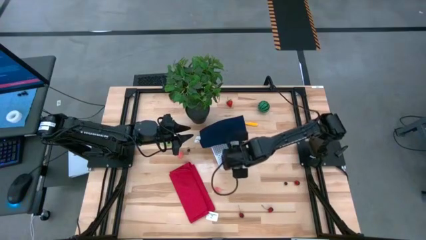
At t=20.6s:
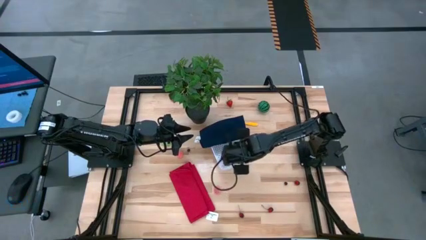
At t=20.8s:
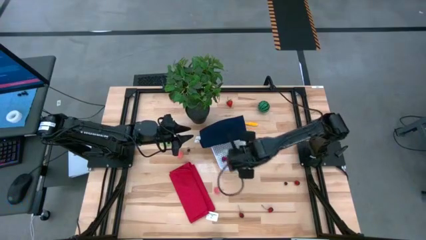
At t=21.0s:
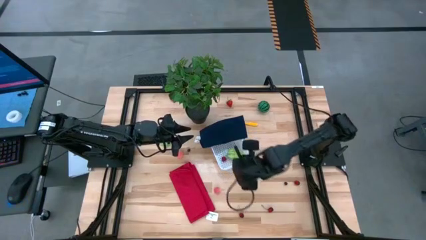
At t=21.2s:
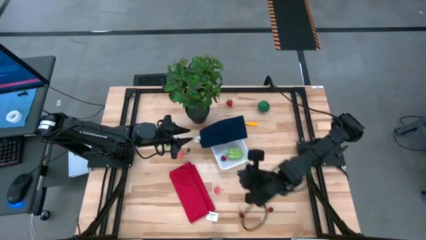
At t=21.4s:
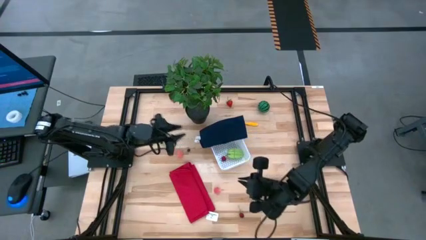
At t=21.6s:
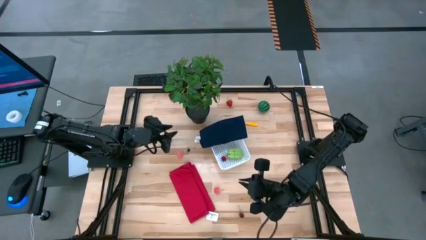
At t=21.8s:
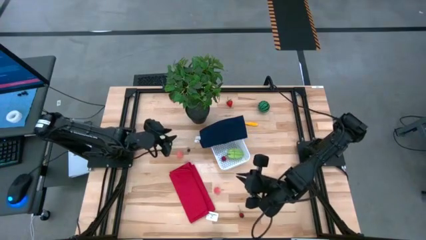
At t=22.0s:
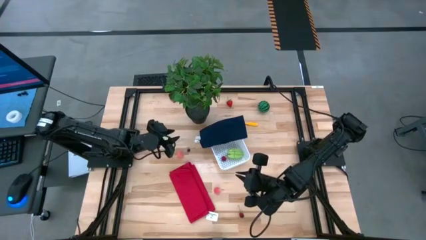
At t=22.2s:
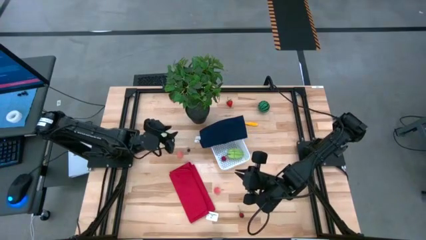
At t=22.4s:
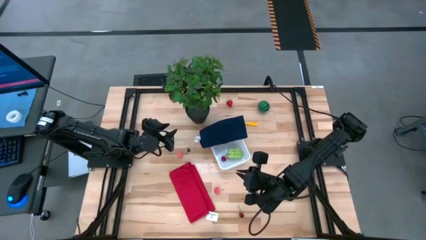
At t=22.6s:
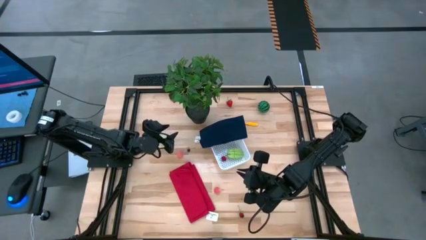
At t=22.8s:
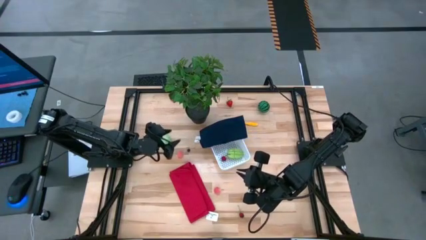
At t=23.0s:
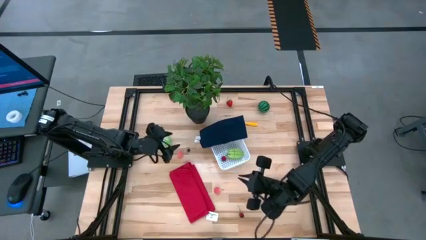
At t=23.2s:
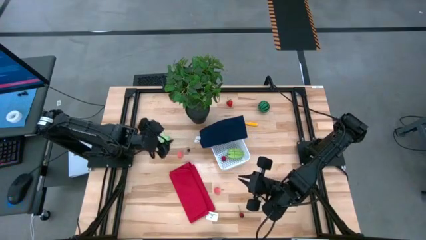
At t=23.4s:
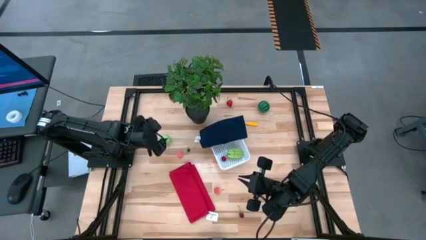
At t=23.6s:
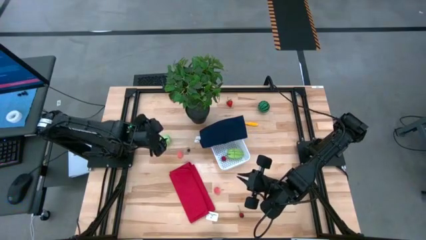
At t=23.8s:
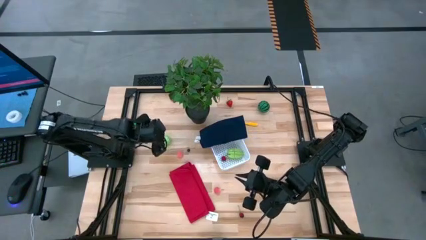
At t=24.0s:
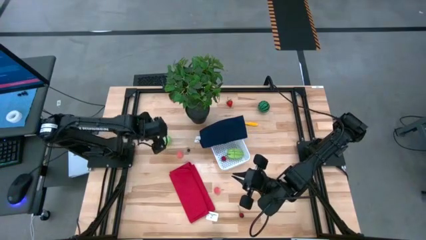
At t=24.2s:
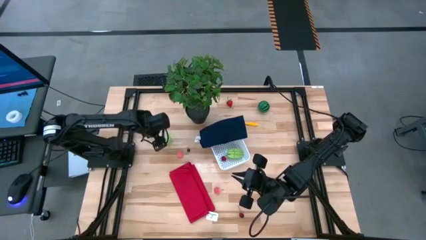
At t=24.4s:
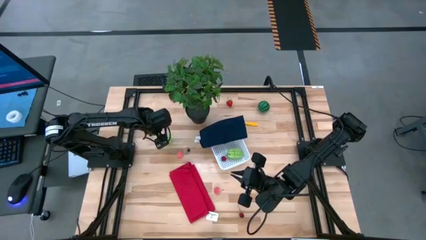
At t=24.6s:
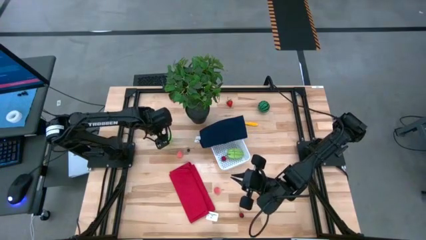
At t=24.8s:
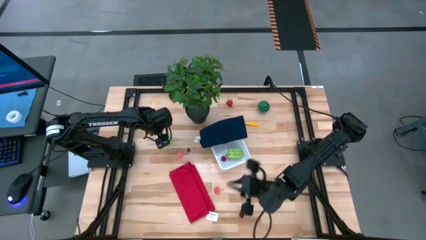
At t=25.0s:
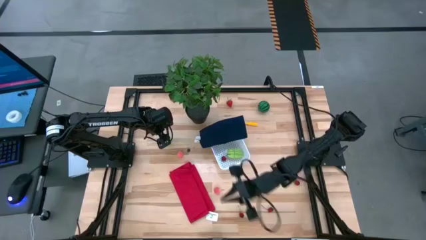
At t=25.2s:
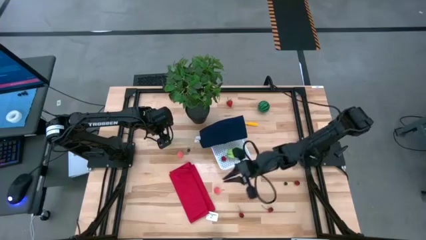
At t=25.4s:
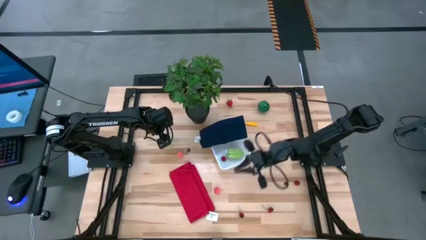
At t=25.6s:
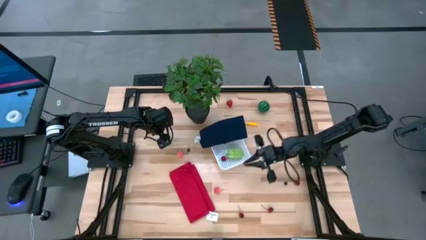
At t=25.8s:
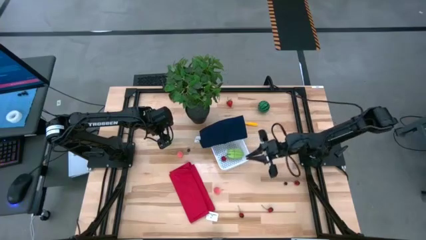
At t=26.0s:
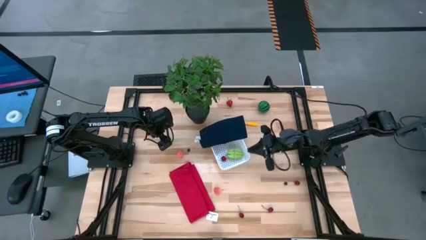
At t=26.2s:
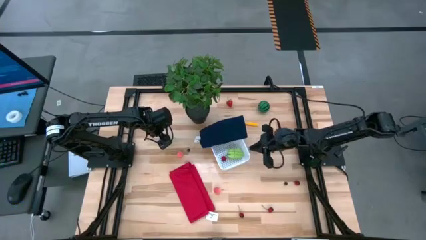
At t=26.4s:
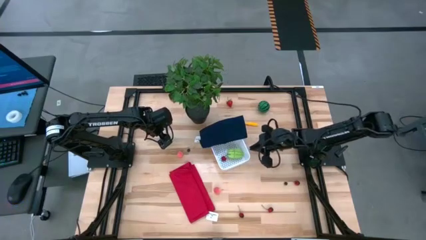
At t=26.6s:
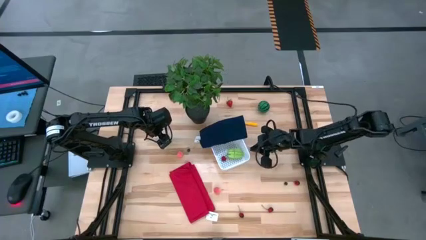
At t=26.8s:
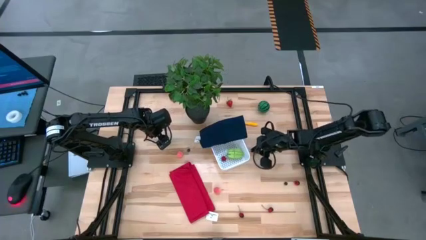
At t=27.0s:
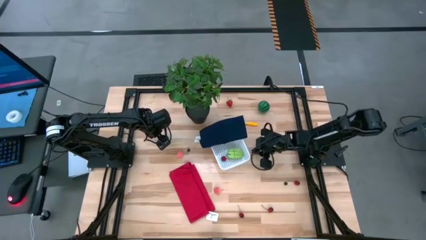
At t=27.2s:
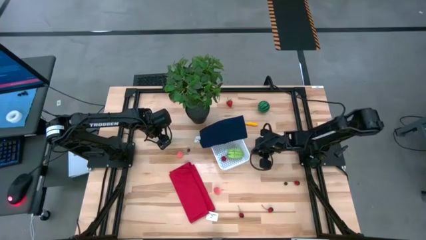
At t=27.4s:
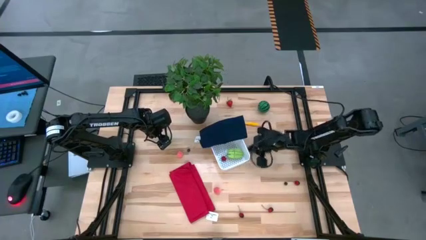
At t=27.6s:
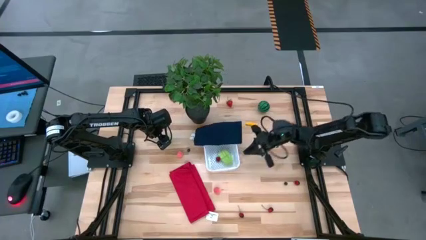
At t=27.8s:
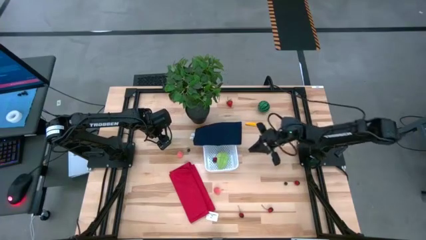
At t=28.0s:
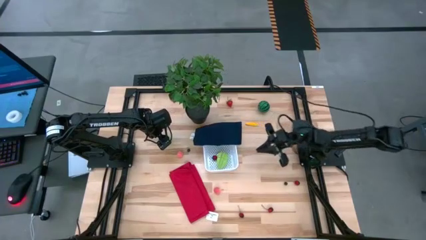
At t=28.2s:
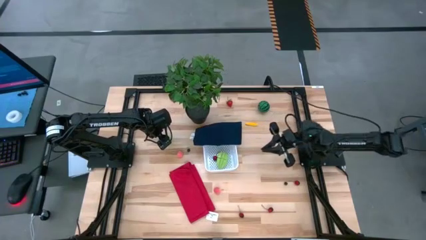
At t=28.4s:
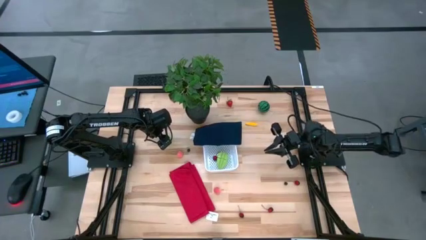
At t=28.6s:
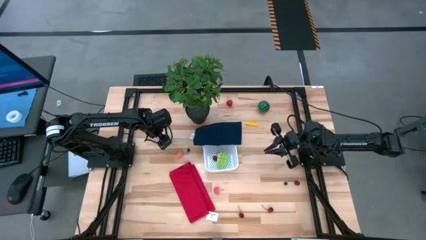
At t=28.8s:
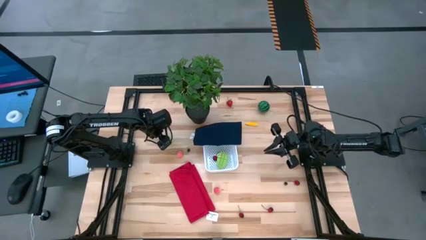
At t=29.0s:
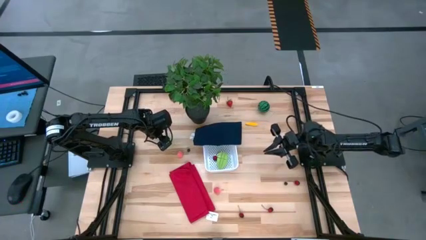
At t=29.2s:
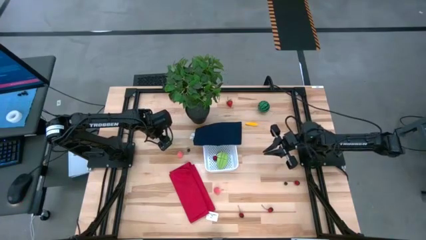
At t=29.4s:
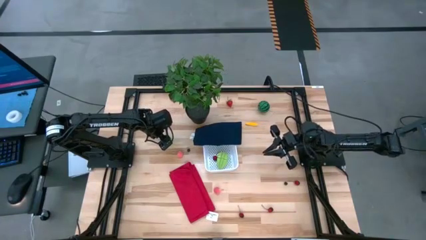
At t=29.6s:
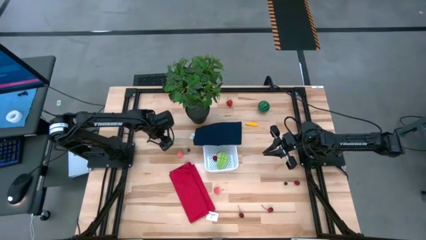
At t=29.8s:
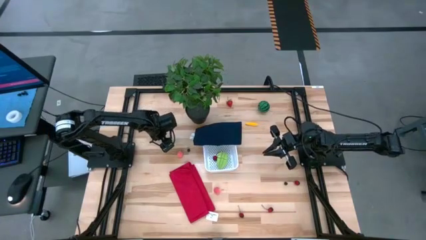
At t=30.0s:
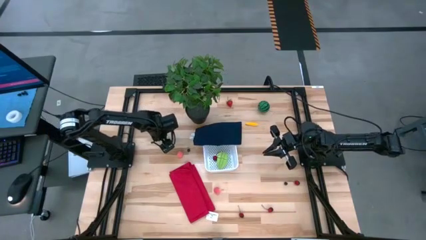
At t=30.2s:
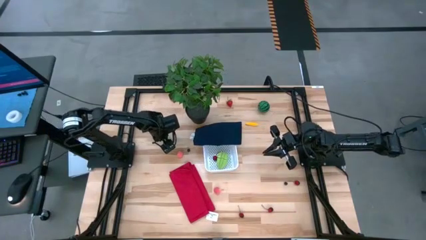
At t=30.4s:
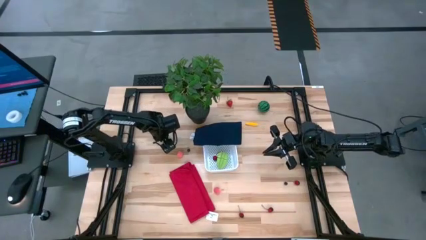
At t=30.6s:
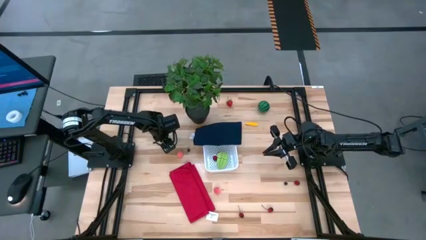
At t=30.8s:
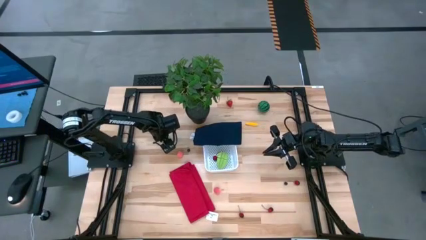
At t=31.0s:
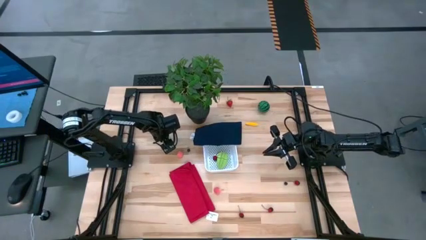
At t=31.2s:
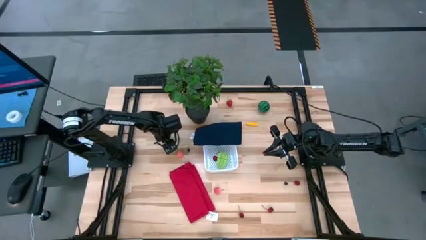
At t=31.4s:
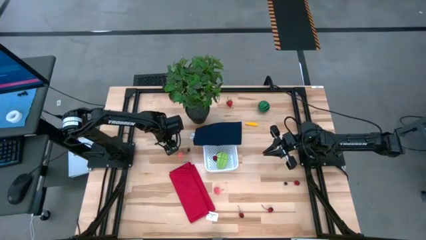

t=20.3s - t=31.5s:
Task: Pick and placing Produce into tupperware
Put the cabbage into the bin

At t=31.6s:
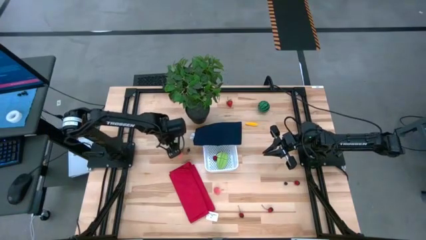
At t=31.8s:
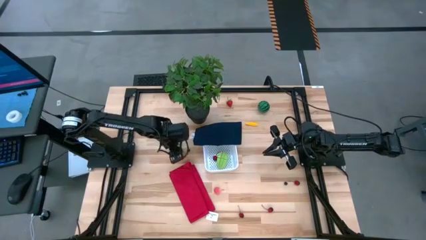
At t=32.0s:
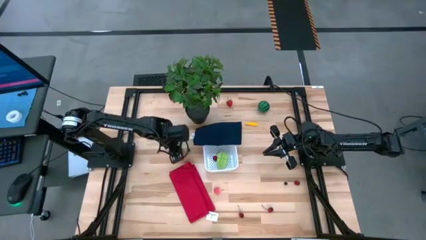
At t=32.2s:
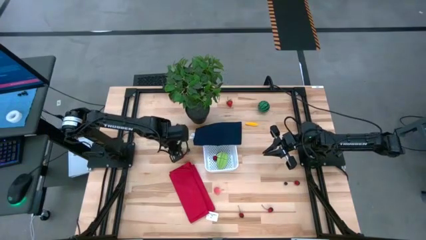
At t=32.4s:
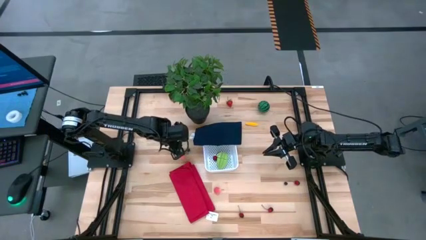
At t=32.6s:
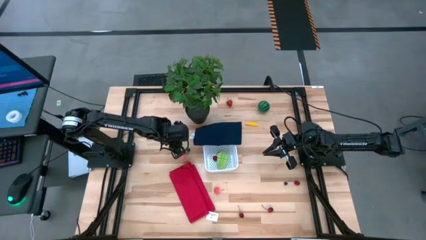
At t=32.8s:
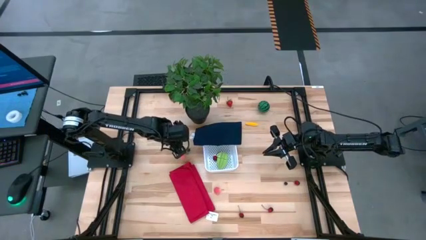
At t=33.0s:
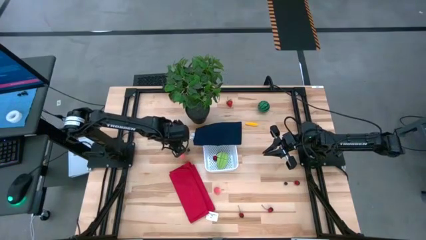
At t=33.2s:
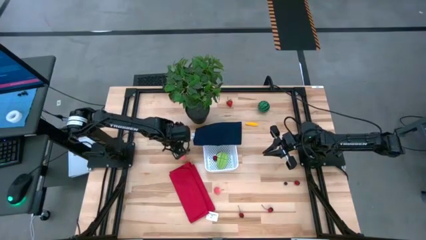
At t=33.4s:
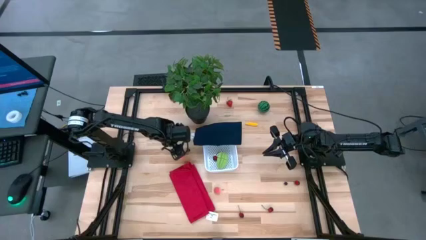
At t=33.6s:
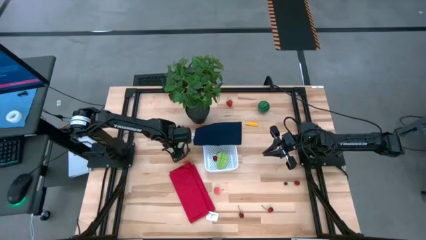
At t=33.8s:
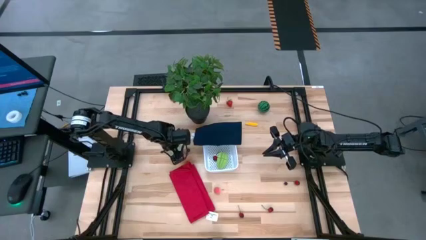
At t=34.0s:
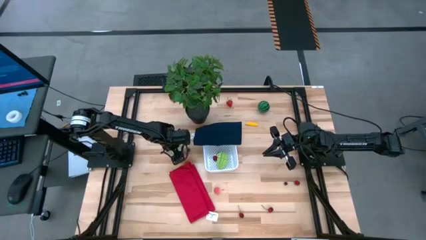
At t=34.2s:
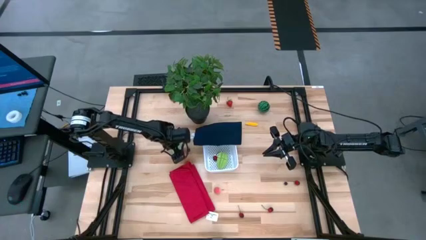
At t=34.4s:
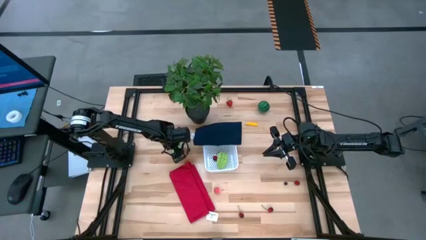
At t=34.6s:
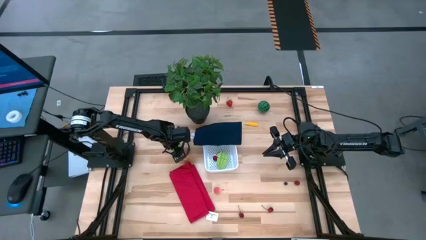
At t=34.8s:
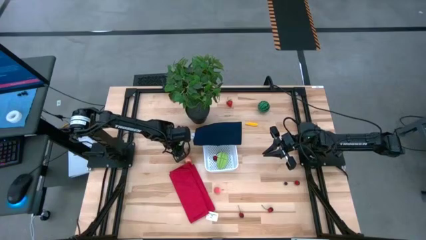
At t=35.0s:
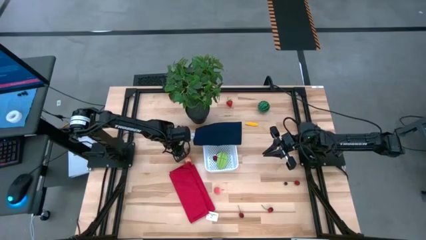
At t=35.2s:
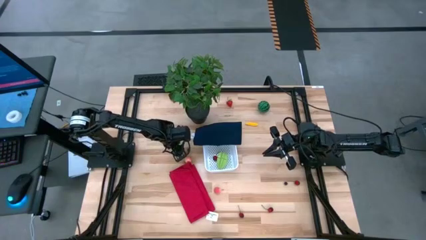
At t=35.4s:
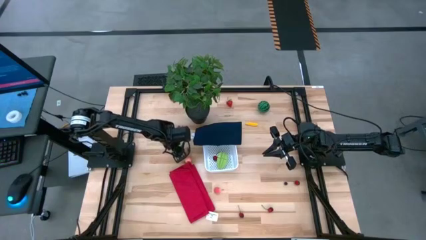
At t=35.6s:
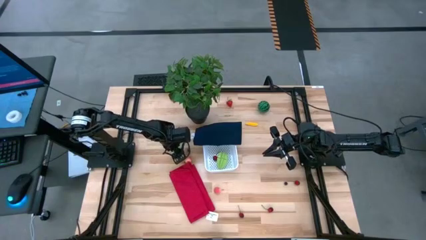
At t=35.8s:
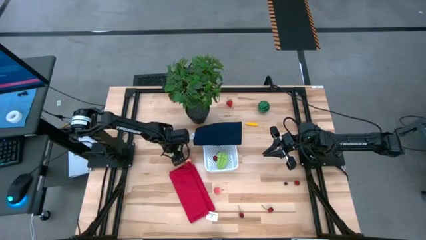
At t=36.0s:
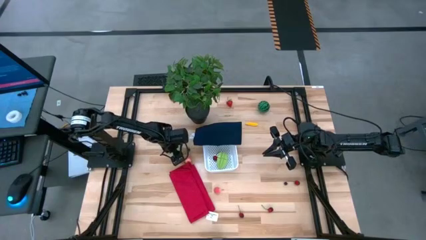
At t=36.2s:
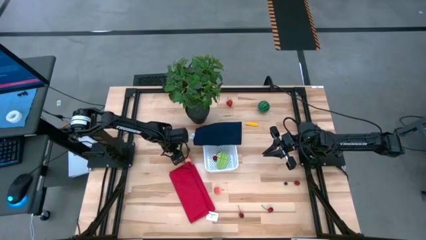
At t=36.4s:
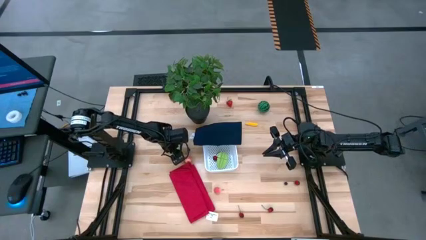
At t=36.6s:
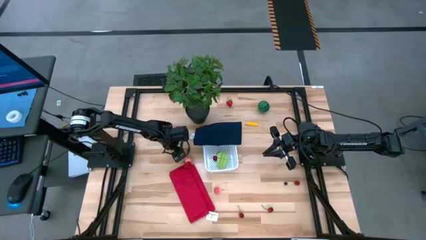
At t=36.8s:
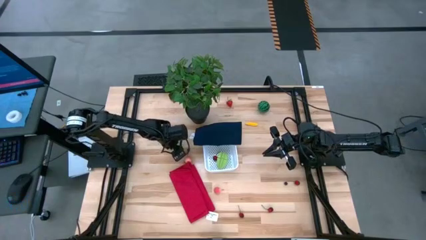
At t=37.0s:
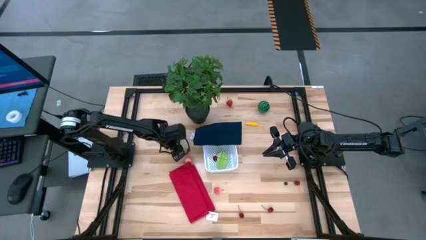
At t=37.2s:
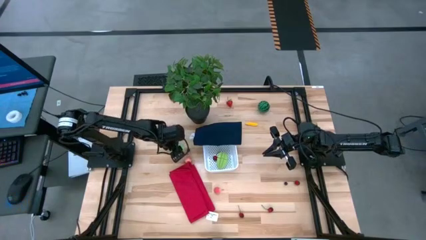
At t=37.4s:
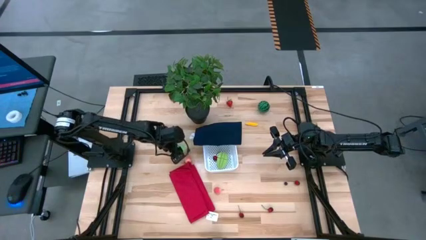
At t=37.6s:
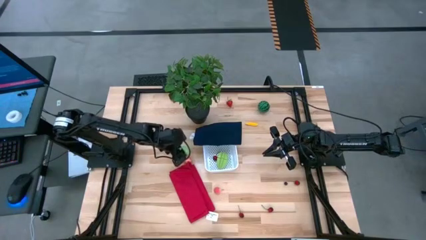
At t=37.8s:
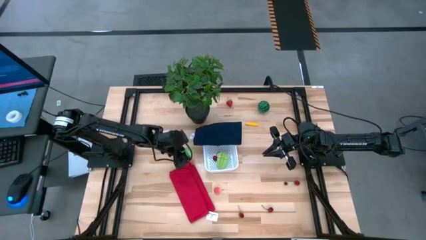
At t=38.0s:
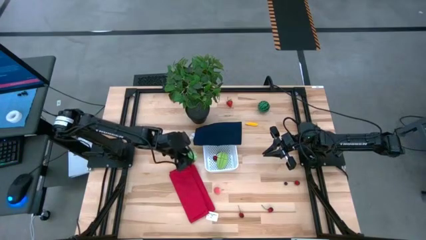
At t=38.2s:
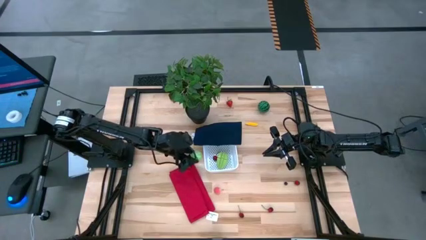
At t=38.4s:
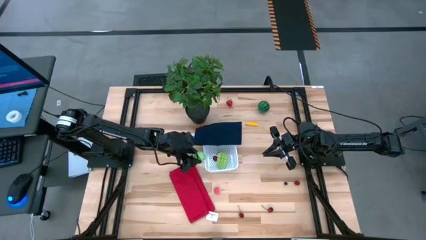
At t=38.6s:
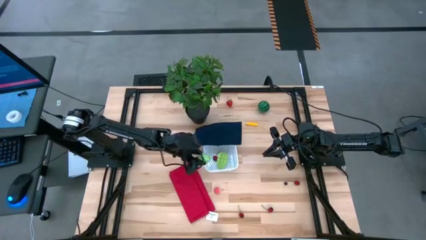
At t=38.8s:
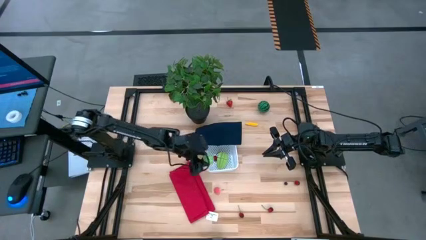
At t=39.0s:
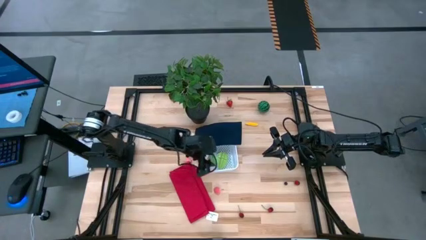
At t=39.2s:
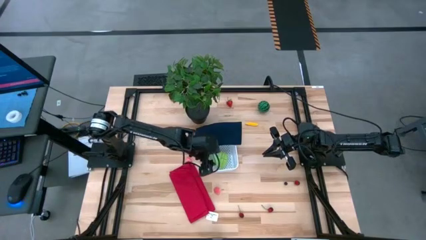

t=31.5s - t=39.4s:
Put the cabbage into the bin
